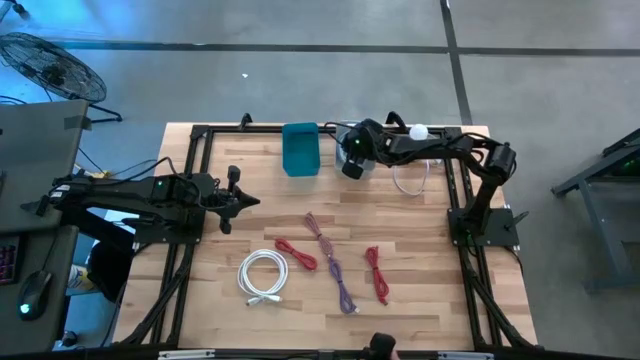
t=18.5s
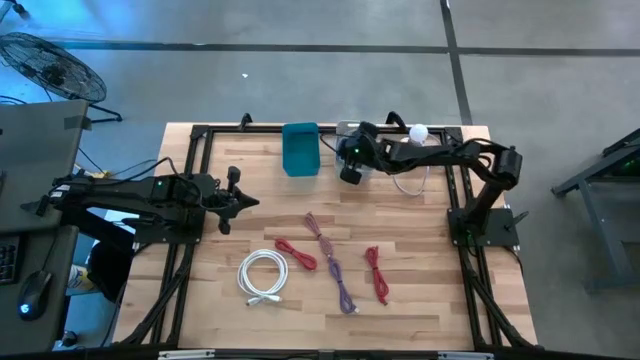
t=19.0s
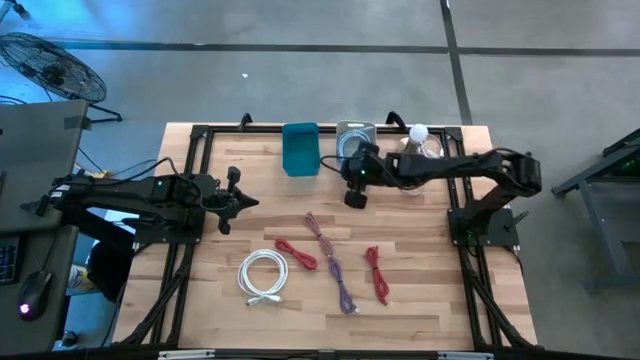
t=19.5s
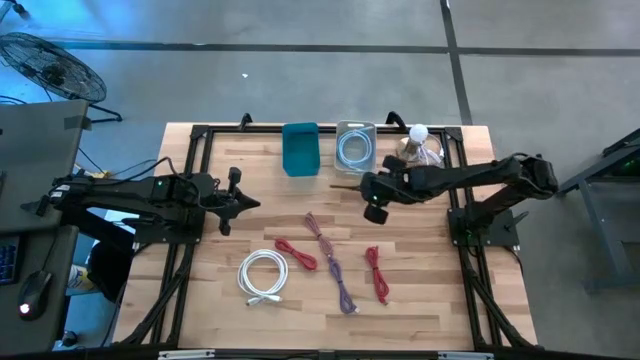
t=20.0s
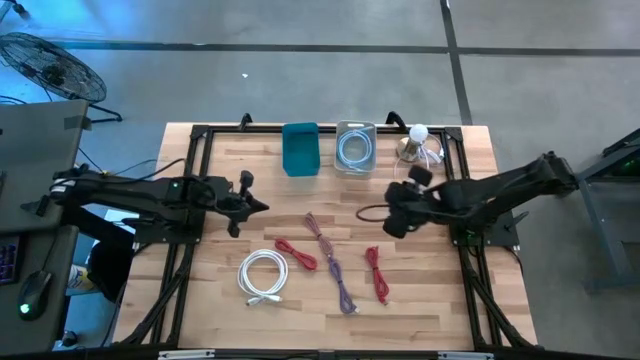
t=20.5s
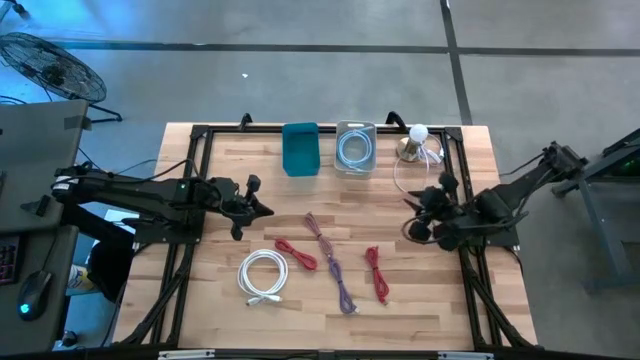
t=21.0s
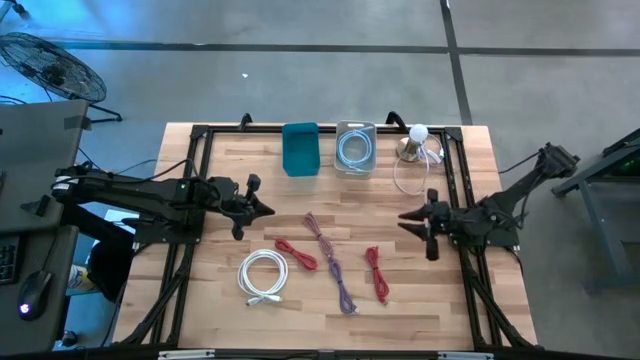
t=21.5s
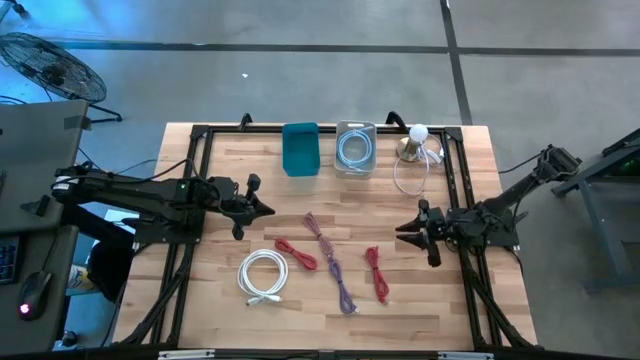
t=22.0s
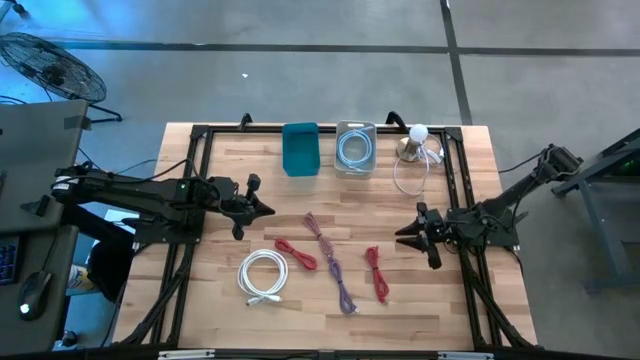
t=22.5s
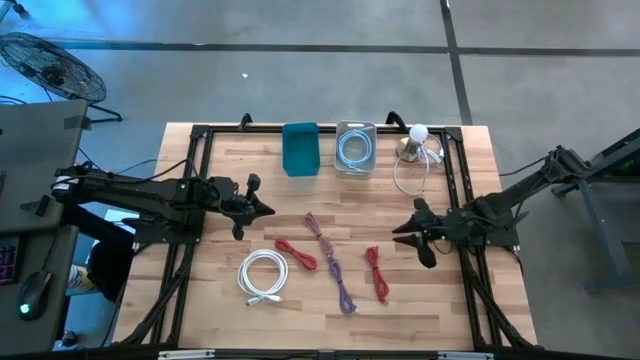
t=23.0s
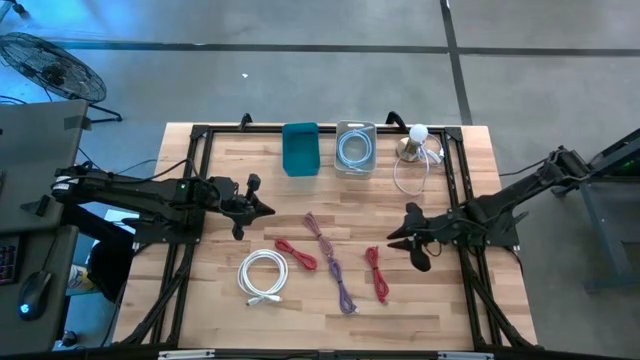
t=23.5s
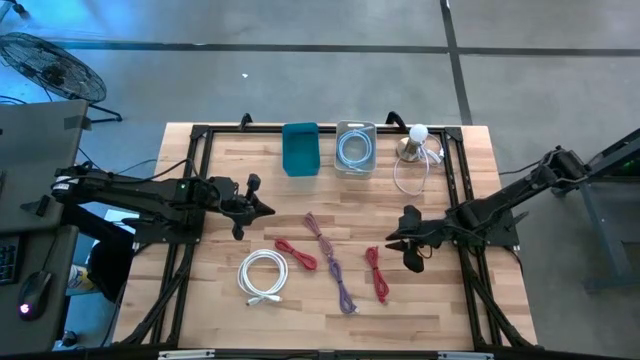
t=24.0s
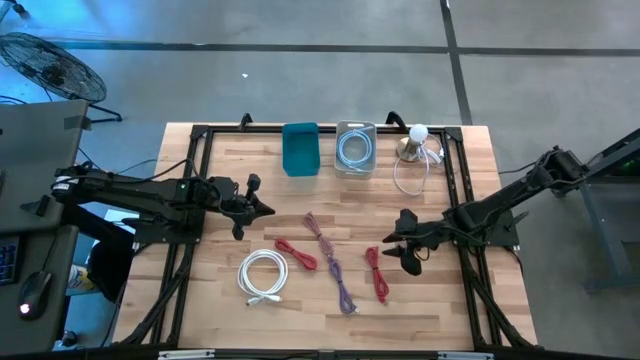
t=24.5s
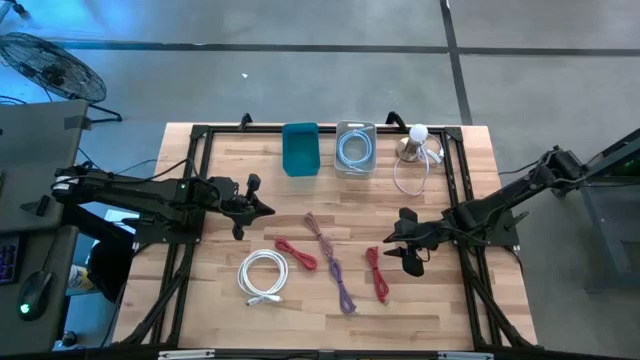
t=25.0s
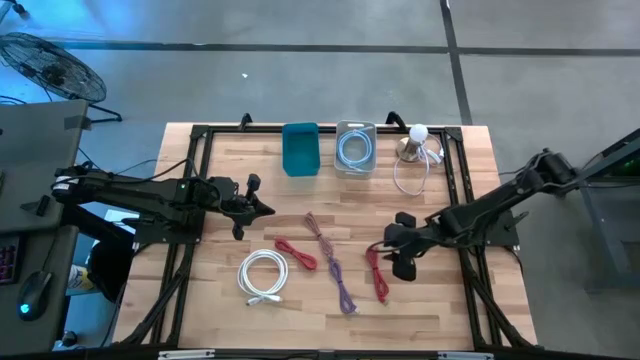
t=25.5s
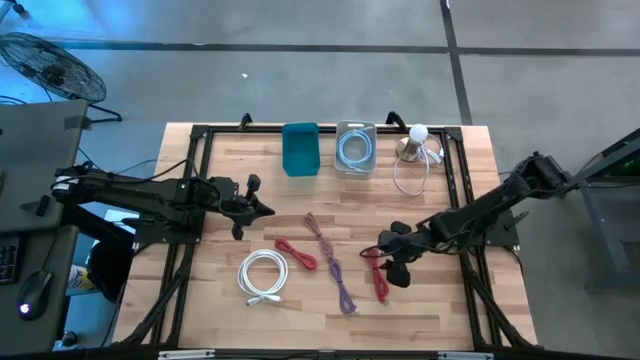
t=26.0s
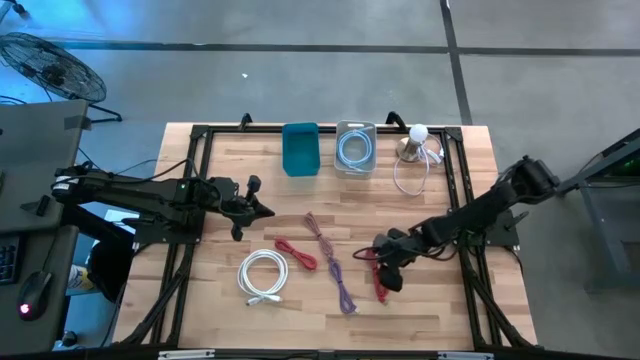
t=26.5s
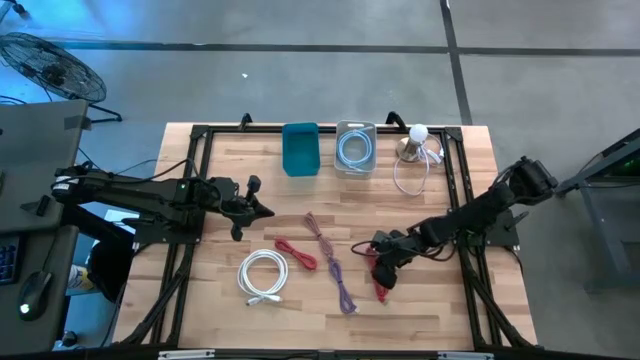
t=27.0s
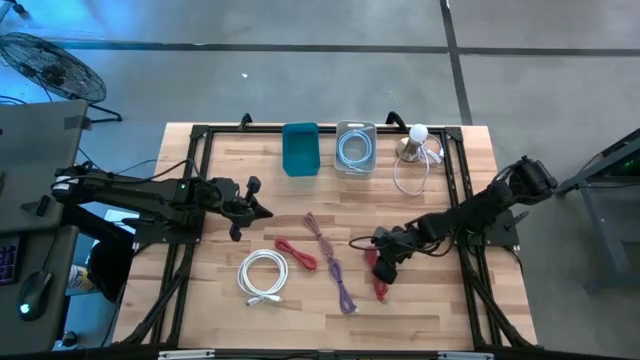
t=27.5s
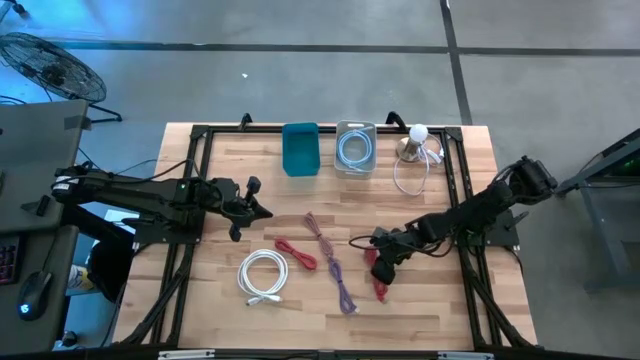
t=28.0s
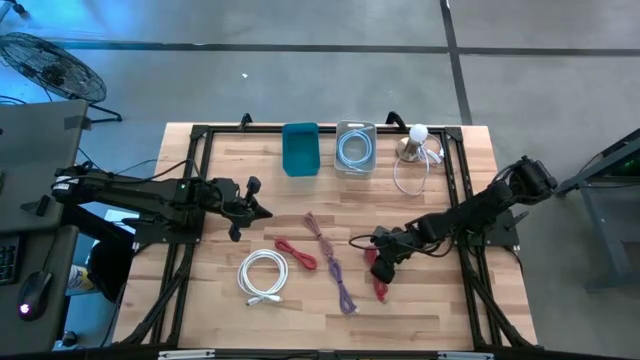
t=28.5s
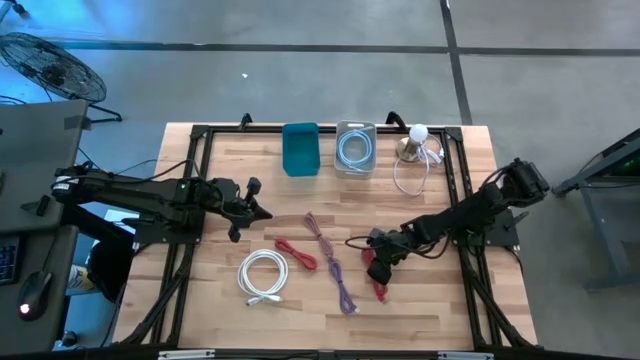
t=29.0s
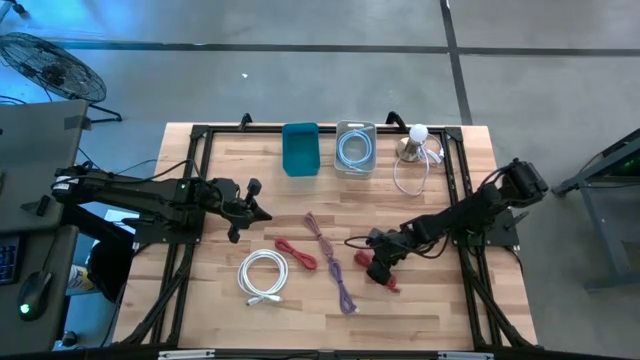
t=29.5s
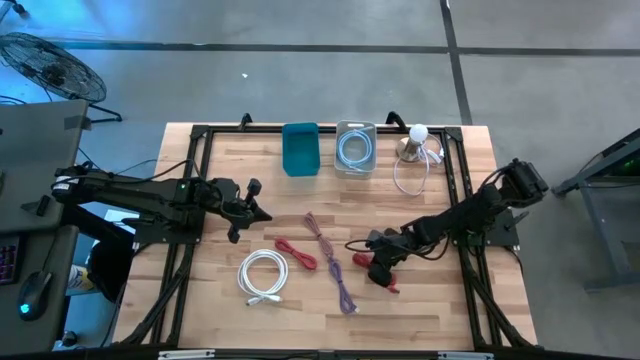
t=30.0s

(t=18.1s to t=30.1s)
Task: Pick & Place USB Port
Put the right orange charger cable into the blue bin

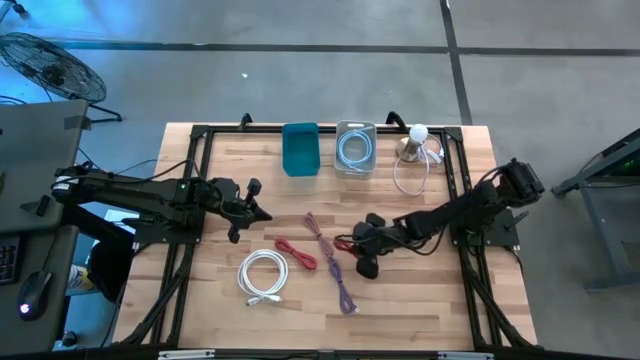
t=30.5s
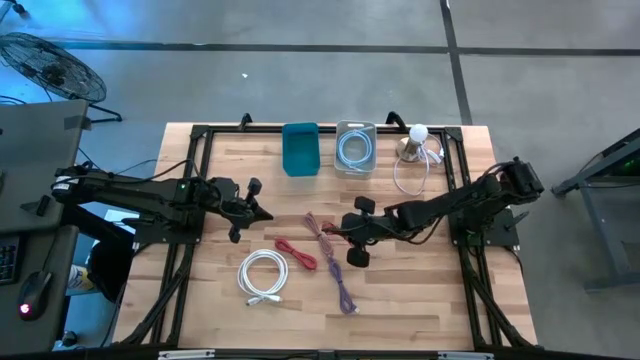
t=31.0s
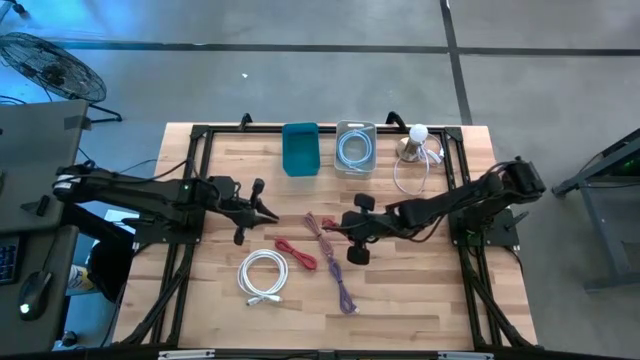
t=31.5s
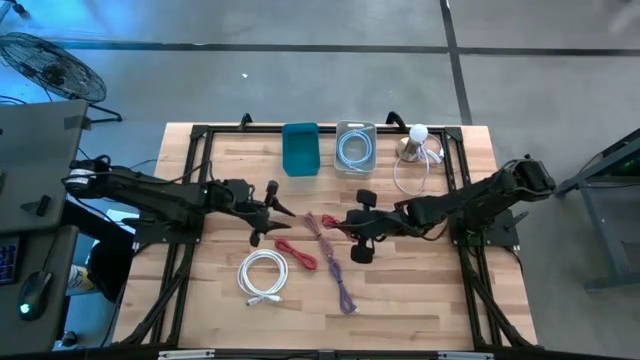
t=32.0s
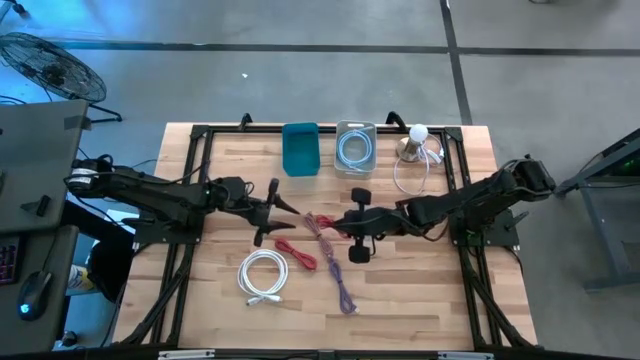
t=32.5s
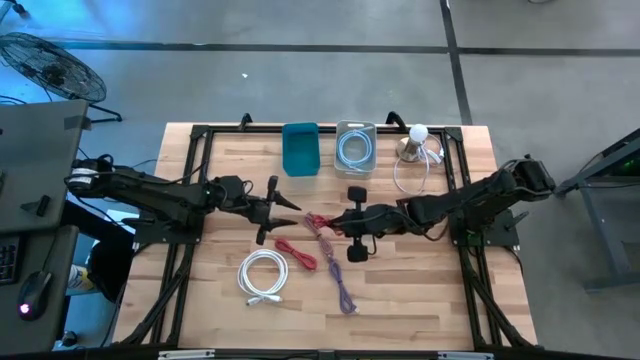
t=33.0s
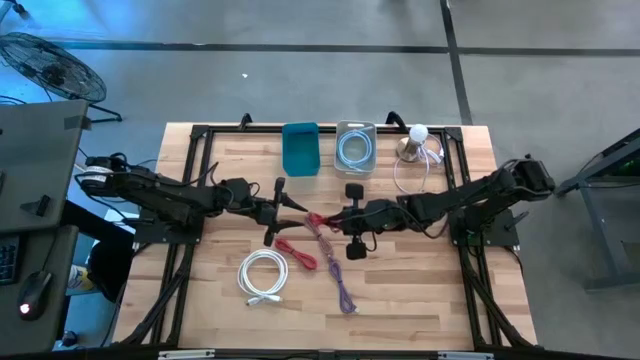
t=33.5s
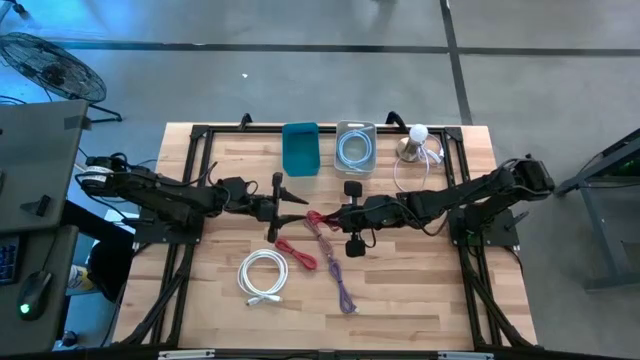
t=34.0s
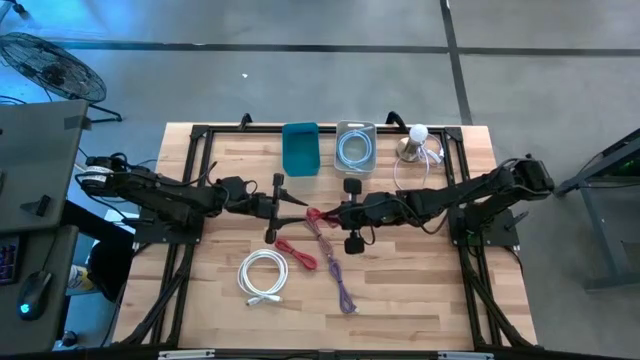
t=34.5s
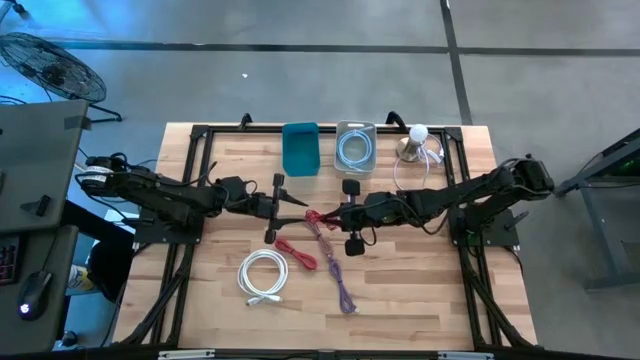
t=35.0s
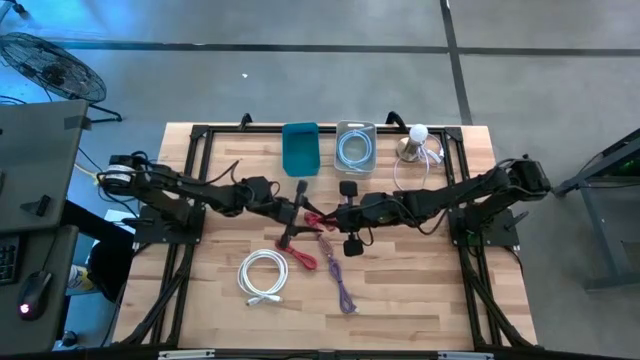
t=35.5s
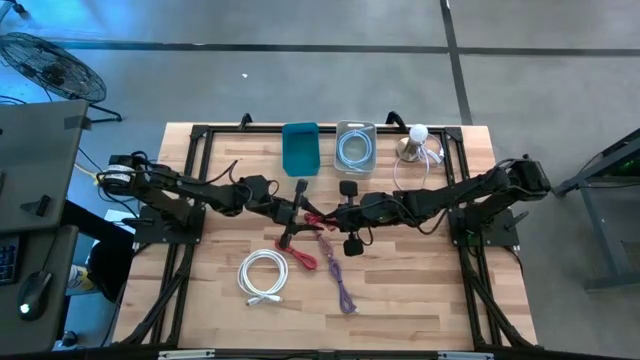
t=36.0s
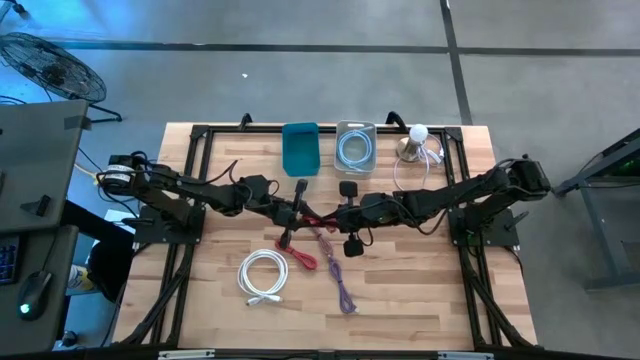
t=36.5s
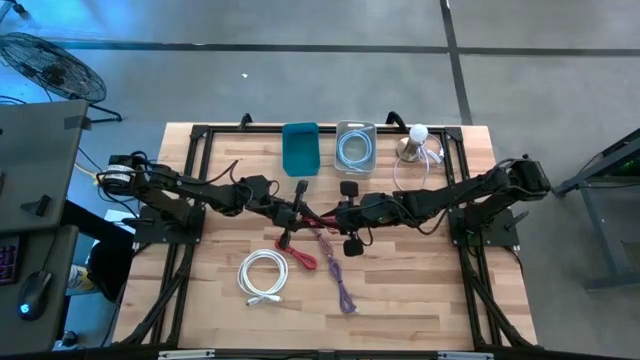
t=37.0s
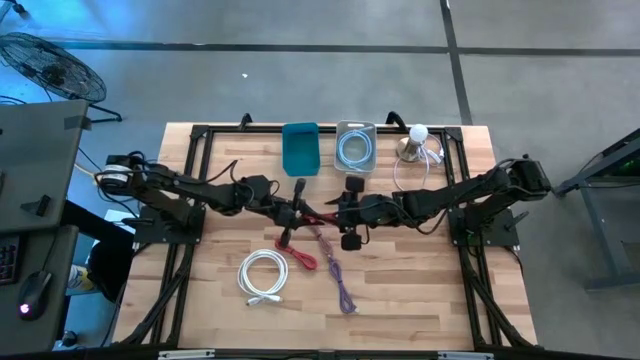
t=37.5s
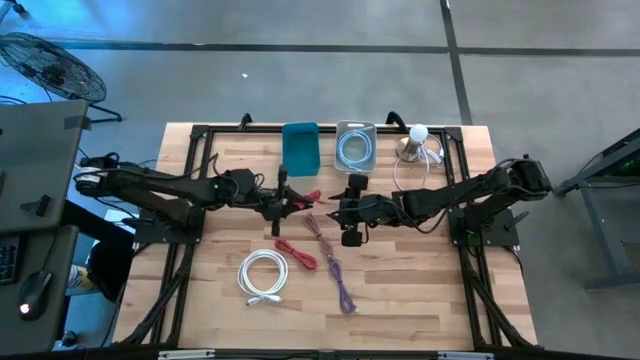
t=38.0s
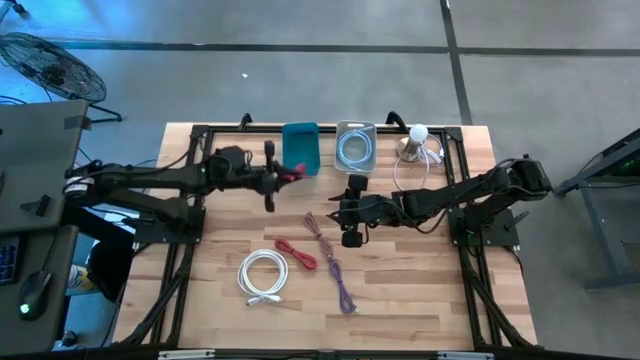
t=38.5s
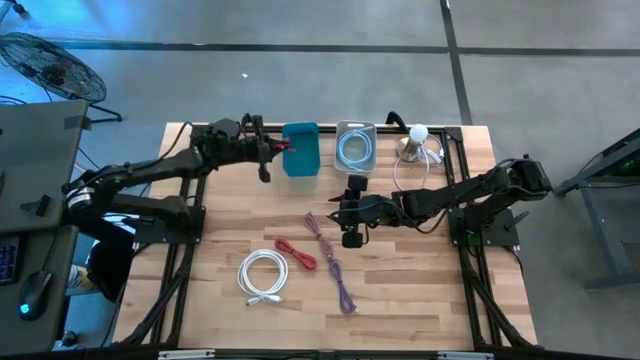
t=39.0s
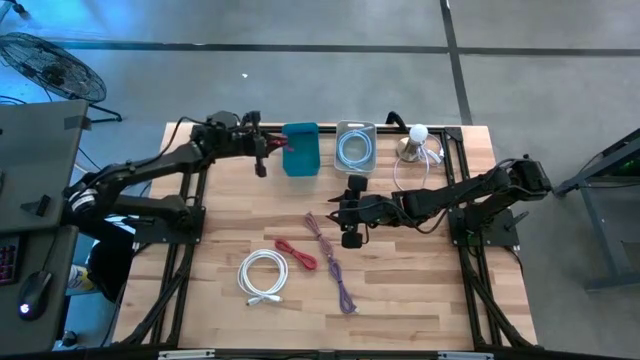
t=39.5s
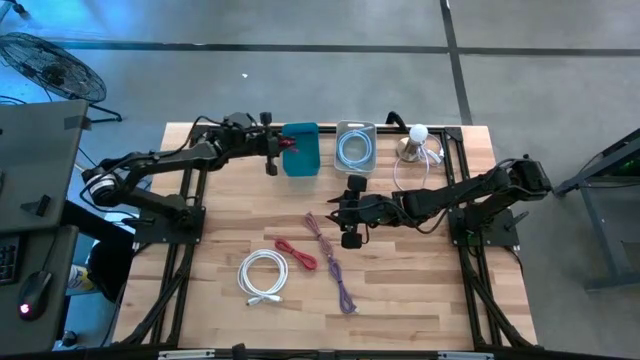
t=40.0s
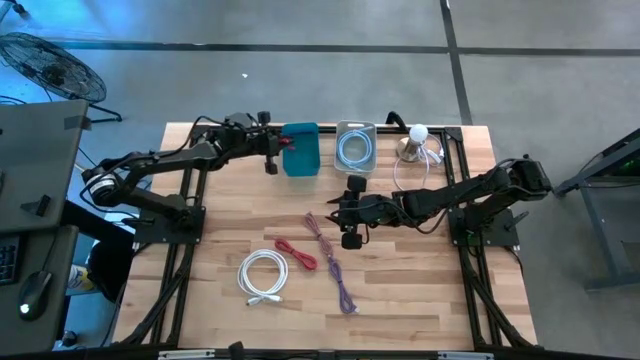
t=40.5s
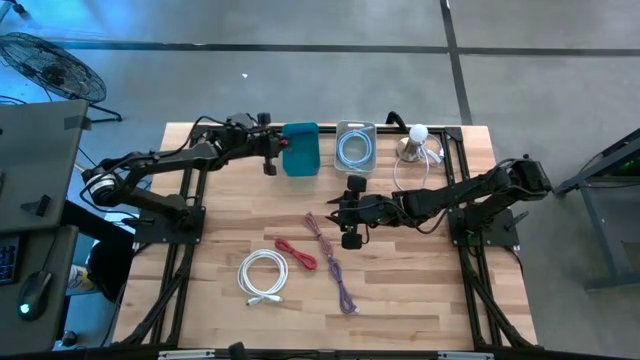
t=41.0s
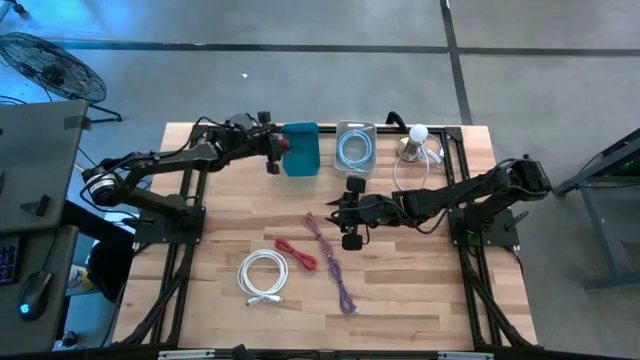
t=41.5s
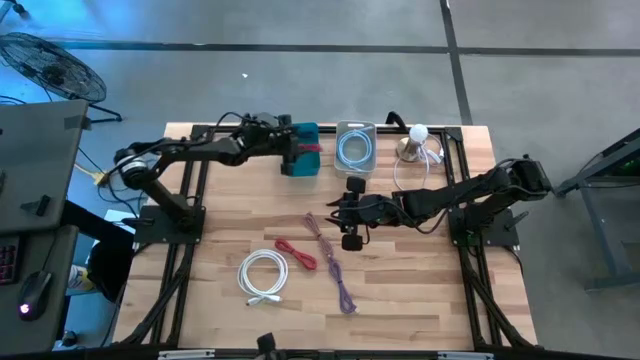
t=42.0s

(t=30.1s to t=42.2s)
Put the right orange charger cable into the blue bin
